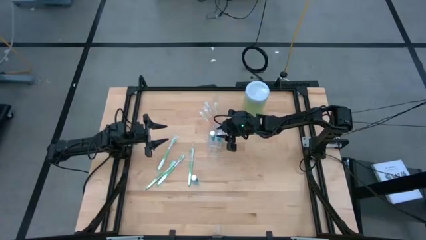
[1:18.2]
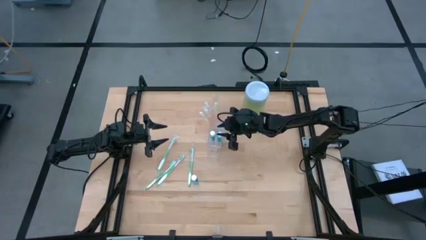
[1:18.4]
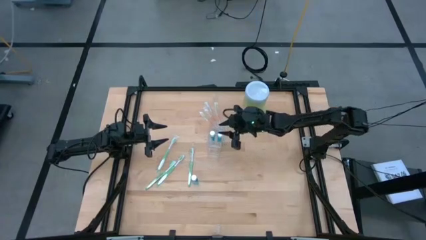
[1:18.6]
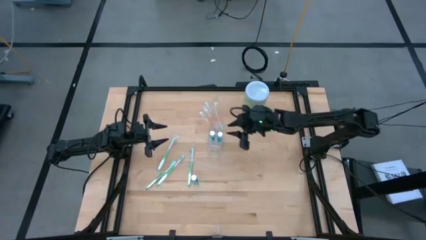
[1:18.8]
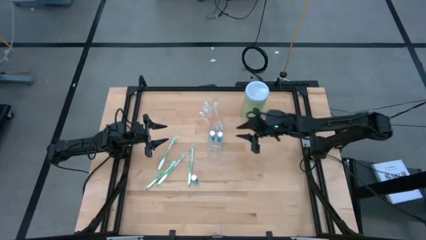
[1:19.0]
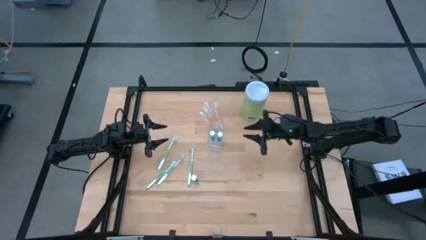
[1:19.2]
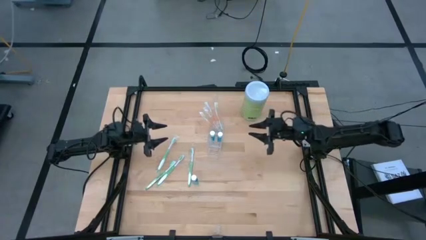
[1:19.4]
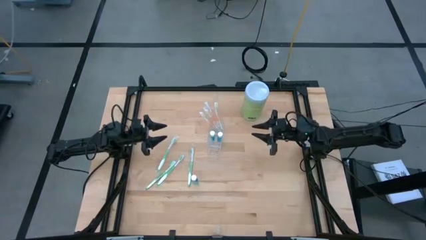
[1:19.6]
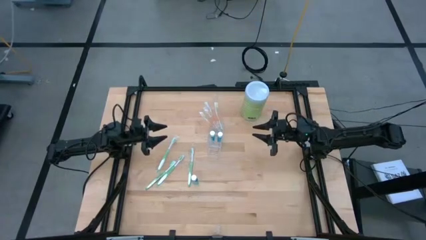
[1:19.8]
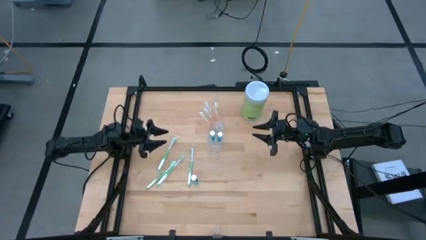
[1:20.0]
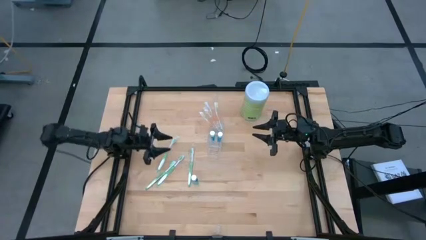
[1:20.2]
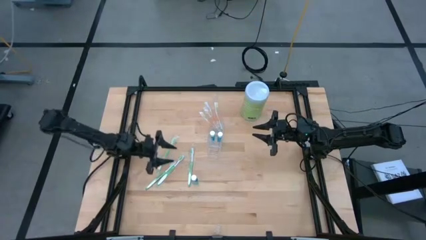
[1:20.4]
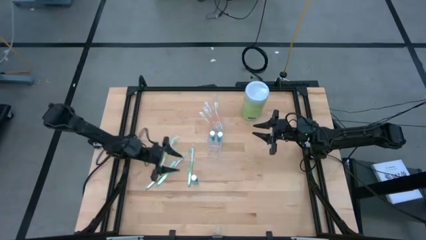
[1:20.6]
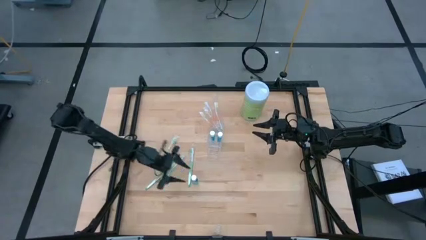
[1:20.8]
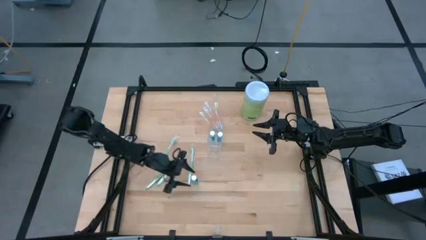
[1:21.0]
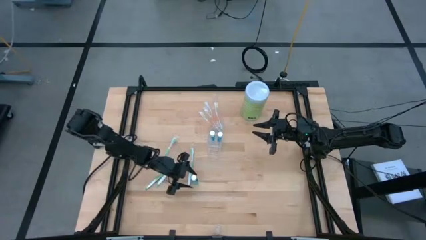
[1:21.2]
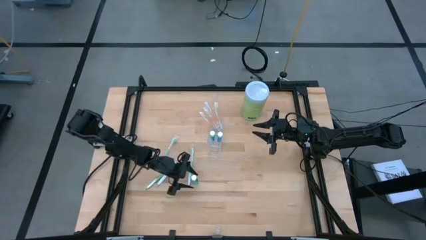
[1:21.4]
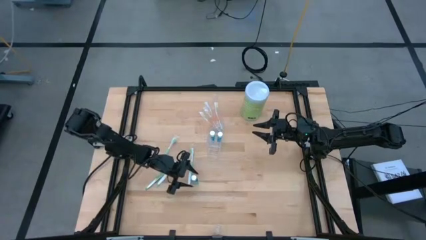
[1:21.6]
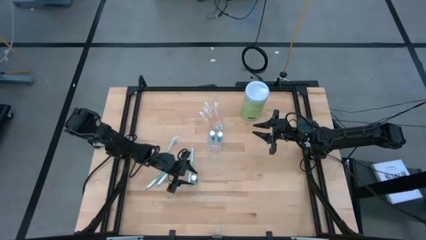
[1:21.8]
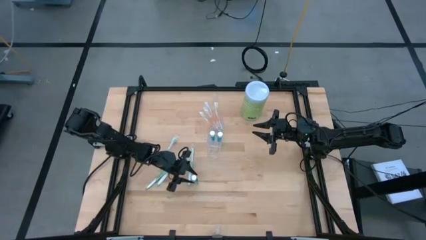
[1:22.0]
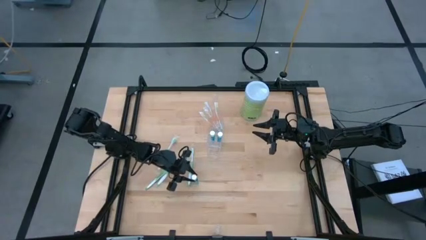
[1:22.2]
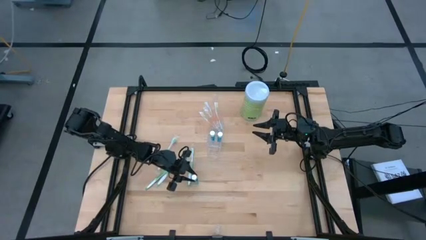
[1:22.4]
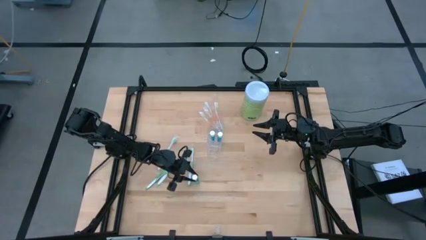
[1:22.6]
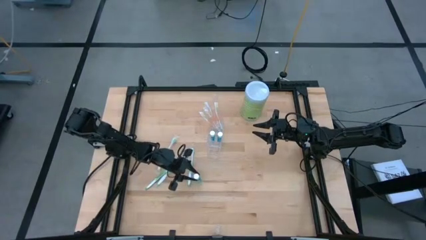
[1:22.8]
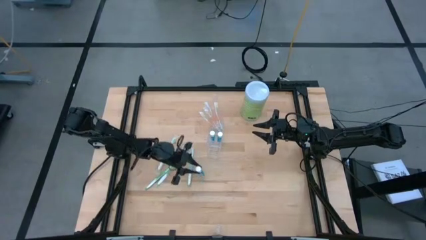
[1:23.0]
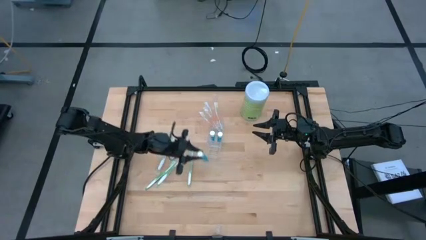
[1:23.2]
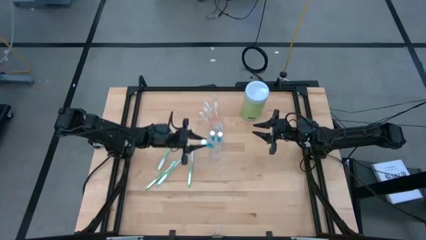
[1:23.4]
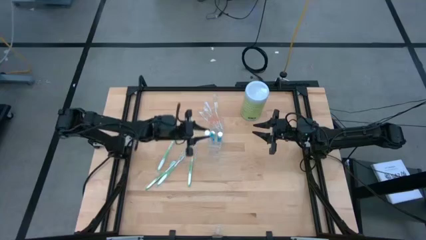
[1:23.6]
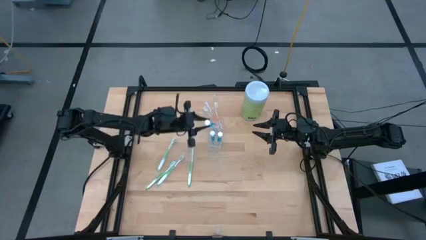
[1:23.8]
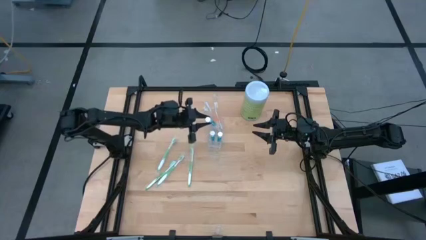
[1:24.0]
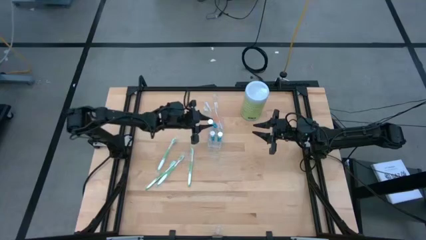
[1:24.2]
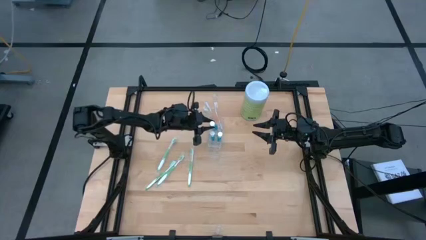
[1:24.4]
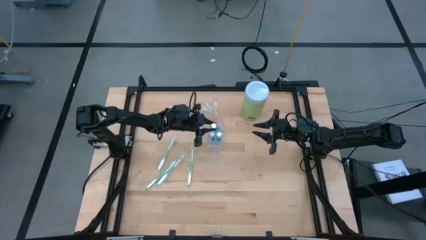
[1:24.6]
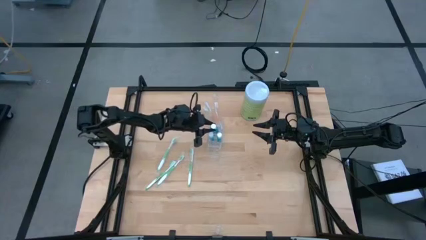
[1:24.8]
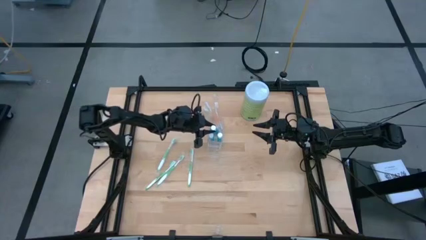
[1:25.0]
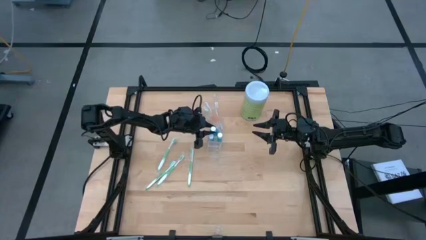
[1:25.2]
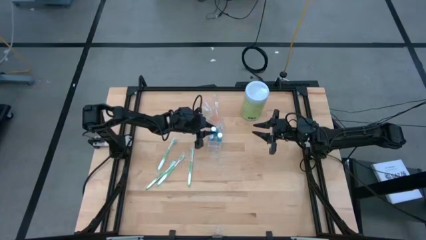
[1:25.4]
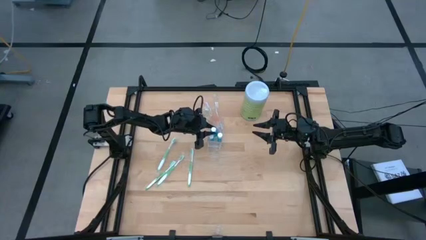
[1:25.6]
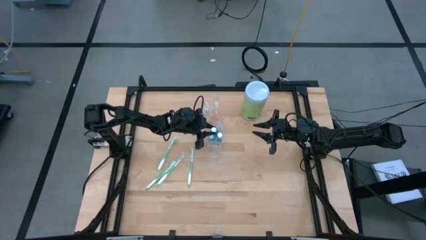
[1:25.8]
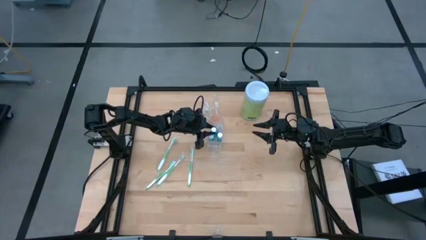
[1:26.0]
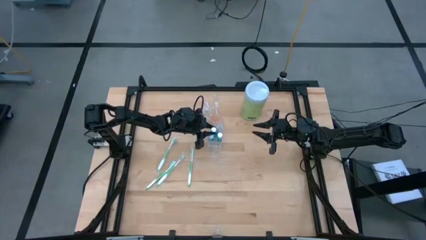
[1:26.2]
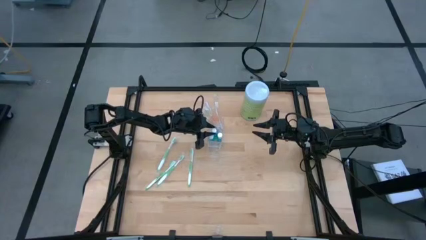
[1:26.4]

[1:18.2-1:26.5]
Task: Pick & Place toothbrushing station
Put the blue mouthwash into the middle portion of the transparent organizer

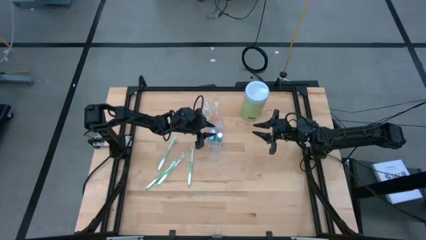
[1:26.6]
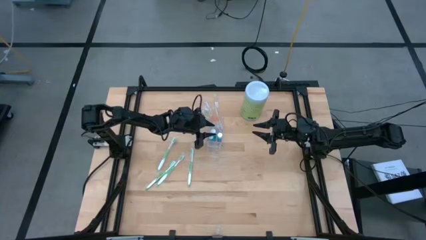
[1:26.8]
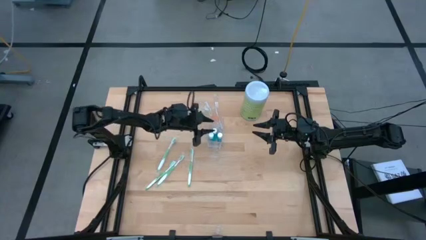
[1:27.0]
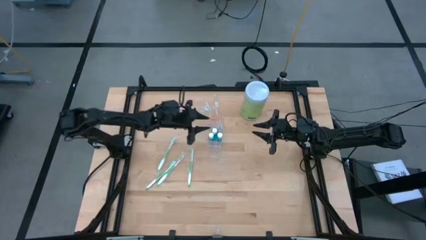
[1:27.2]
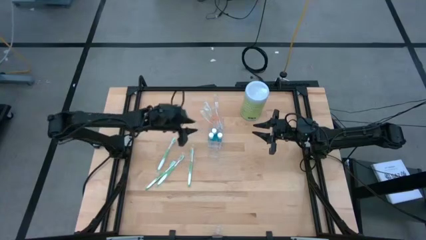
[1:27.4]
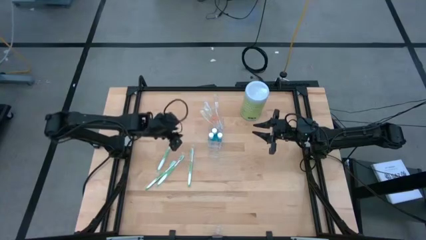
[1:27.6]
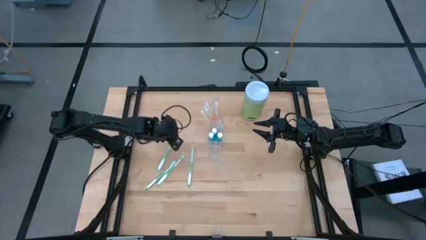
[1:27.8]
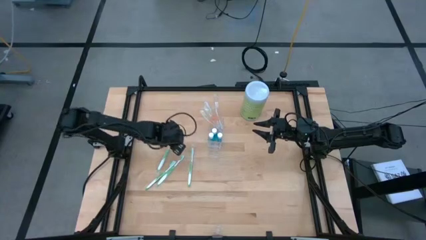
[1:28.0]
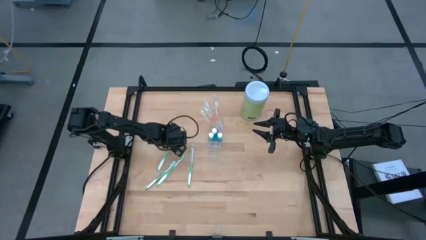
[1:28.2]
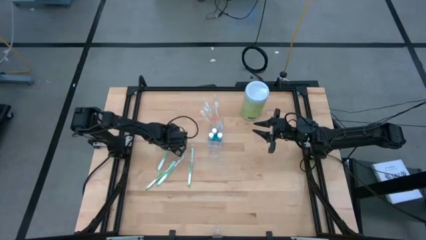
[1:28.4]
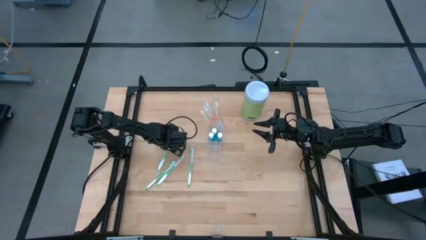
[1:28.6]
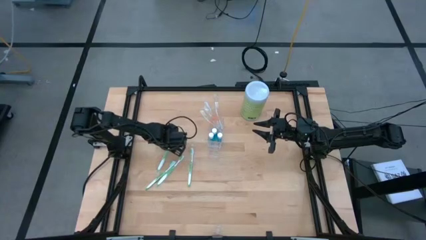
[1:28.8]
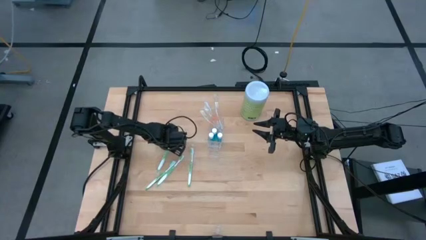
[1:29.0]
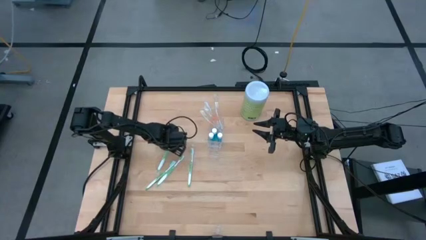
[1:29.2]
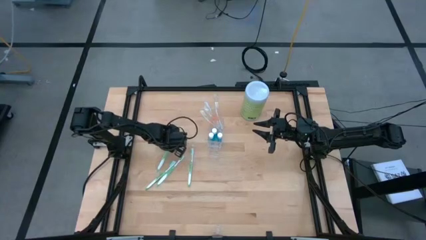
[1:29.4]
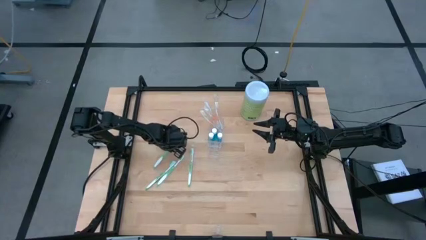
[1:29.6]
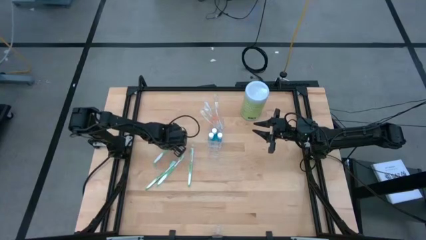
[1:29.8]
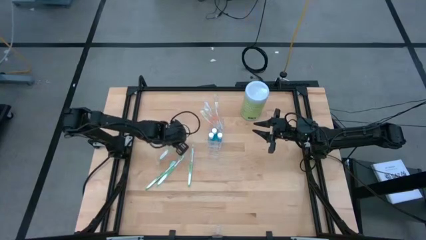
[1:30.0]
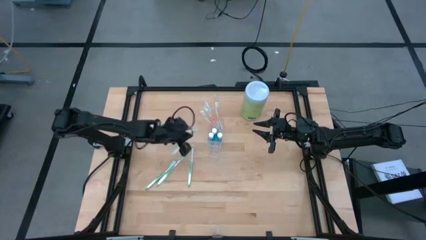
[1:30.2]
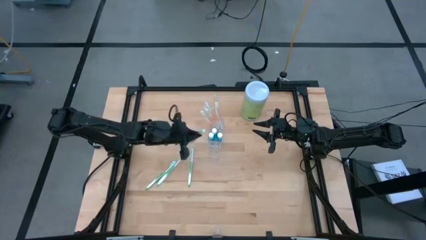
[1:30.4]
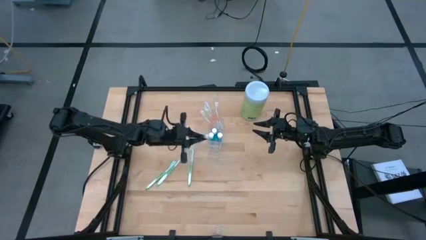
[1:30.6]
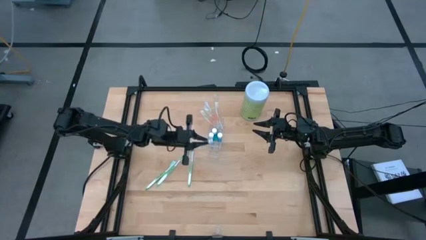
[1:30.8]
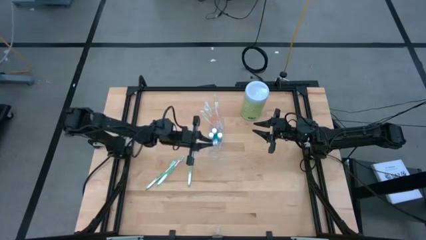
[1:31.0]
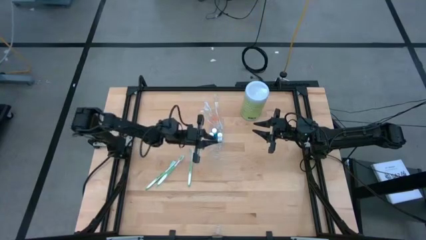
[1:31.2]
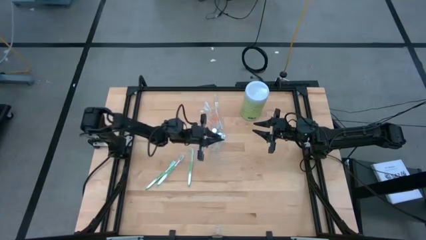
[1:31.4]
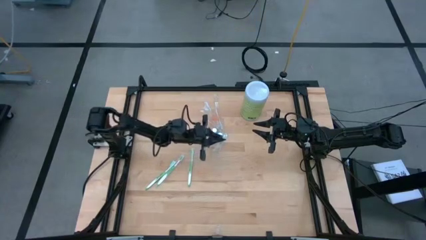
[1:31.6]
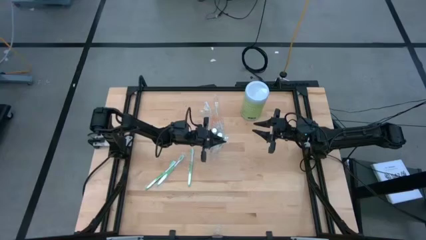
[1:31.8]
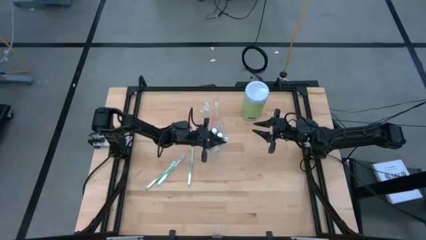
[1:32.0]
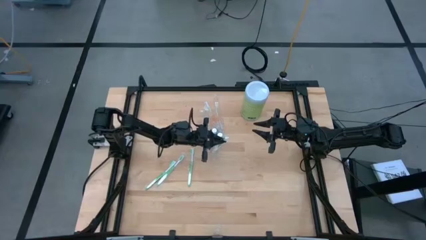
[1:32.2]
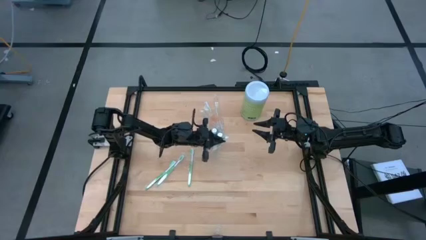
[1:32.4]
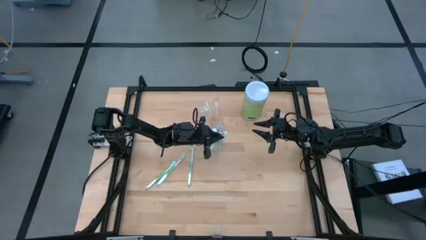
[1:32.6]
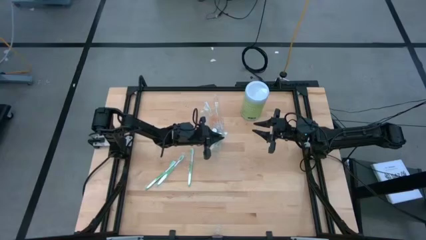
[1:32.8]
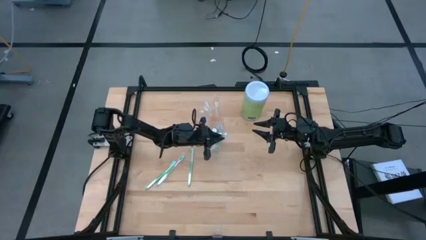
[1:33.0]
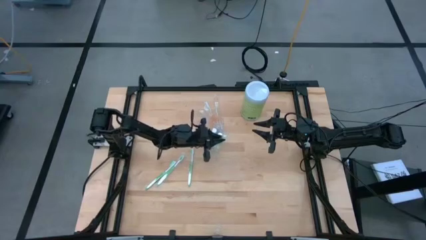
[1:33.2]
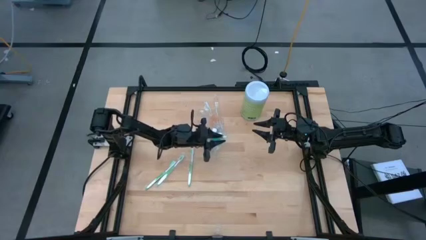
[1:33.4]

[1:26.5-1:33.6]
Put the green toothbrush into the bottom portion of the transparent organizer
